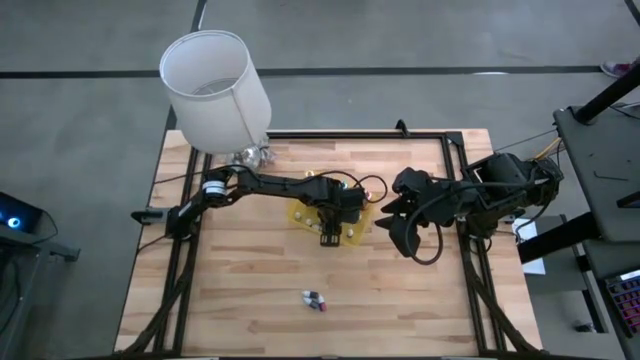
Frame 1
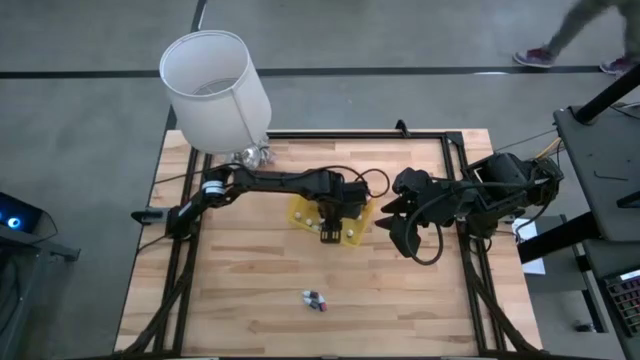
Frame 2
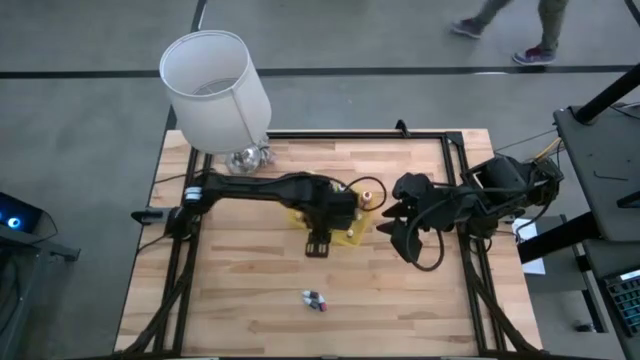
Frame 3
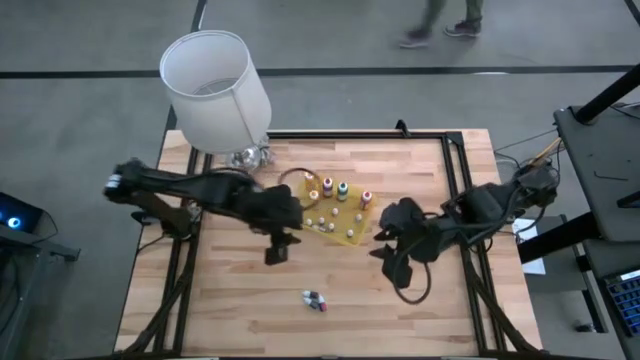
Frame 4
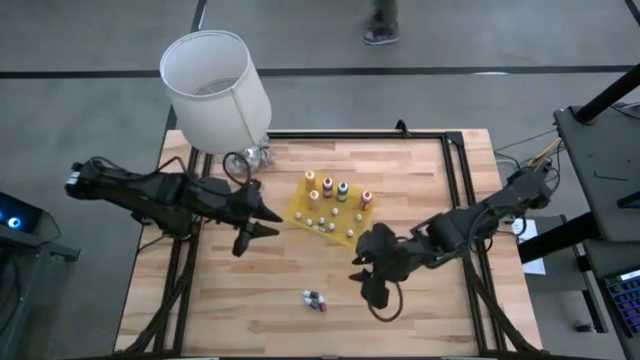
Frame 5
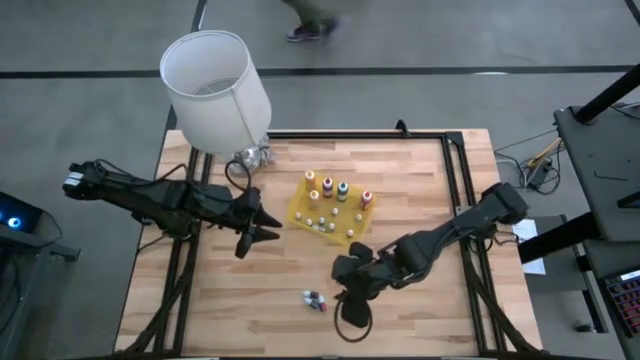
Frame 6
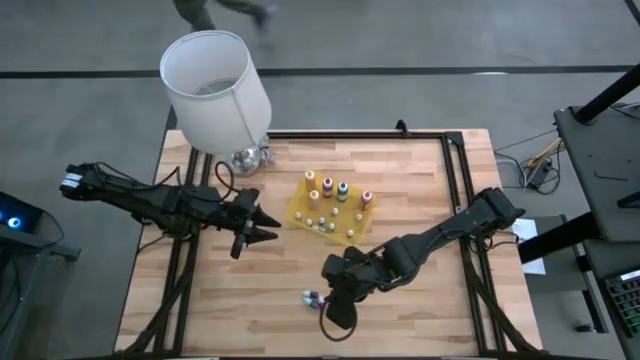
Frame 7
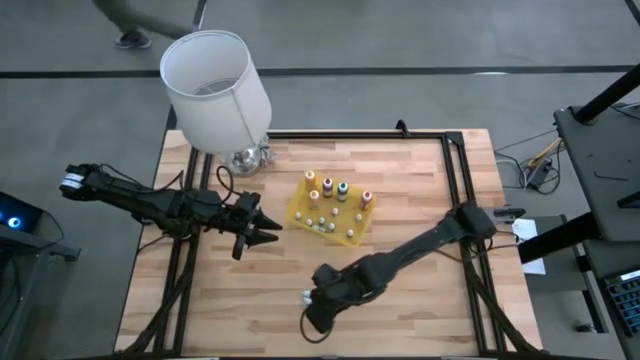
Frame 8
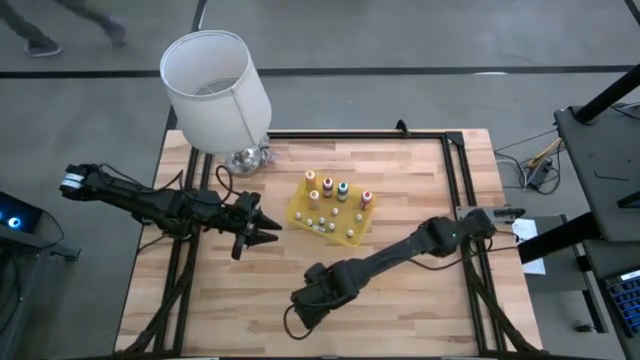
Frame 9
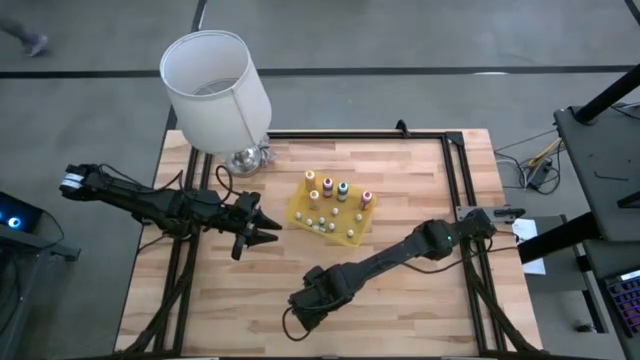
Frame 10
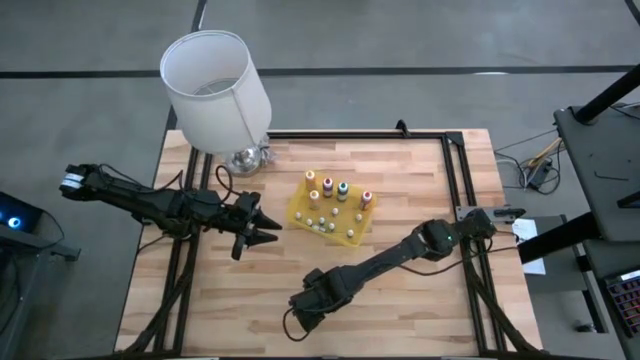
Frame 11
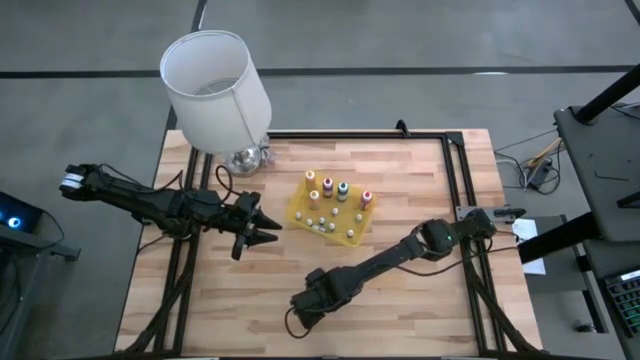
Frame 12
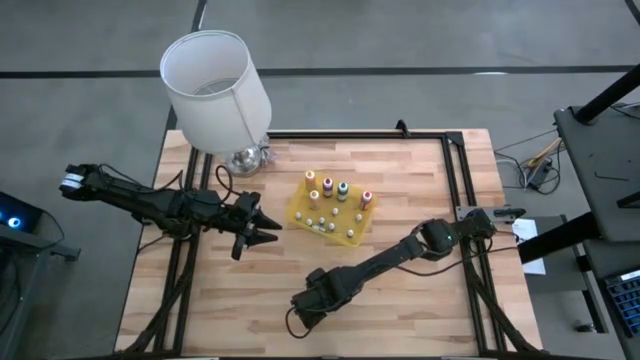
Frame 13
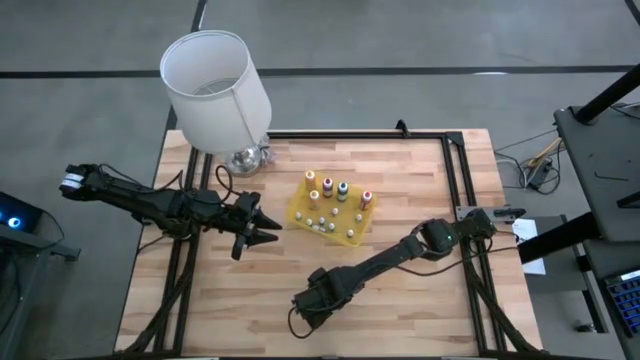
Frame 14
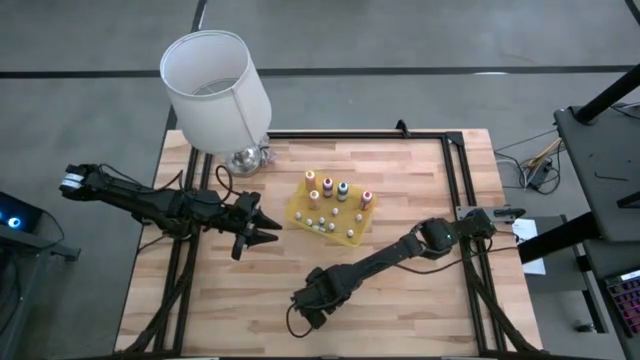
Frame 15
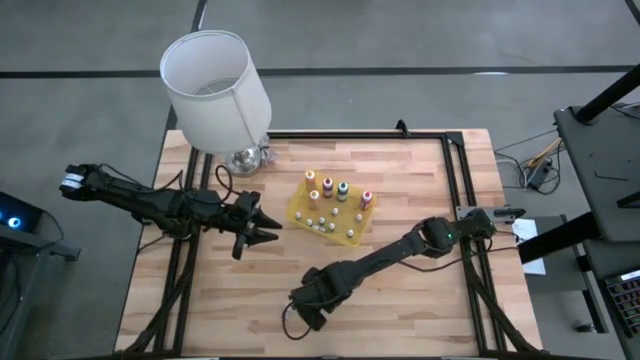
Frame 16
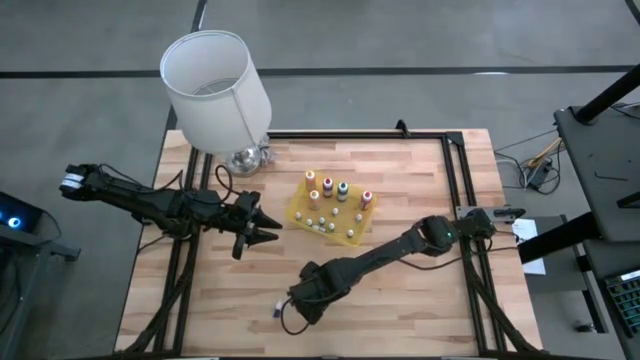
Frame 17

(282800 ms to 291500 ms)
Task: Pick & Place food coloring
Put the small red food coloring bottle into the yellow bin

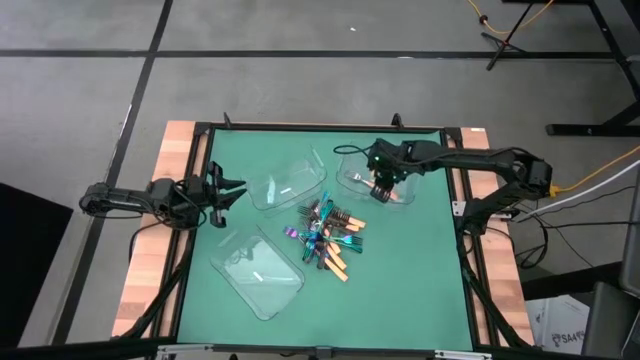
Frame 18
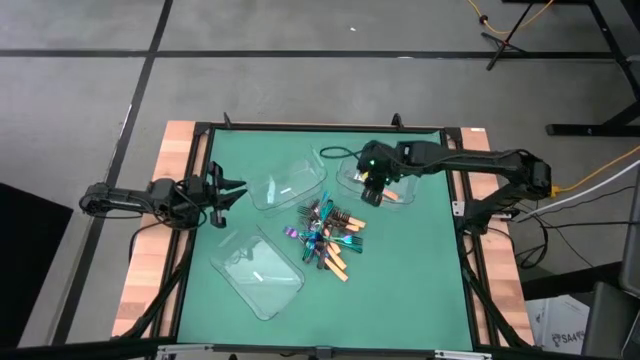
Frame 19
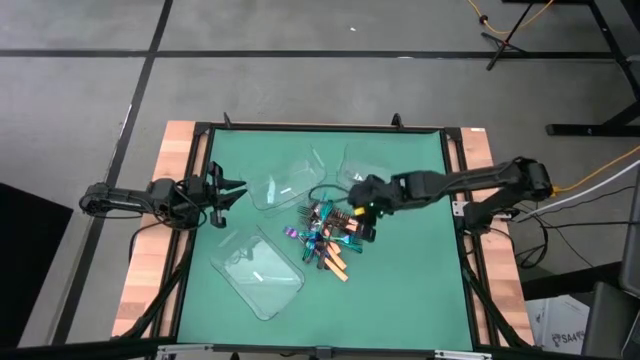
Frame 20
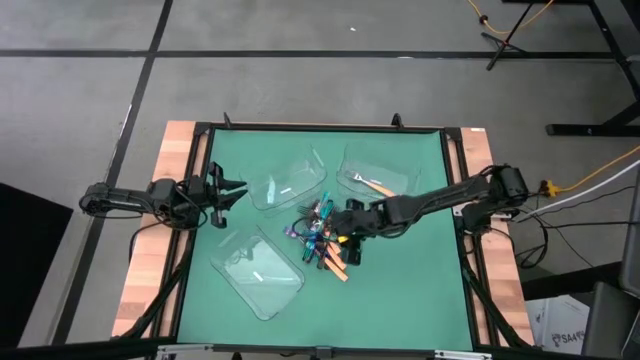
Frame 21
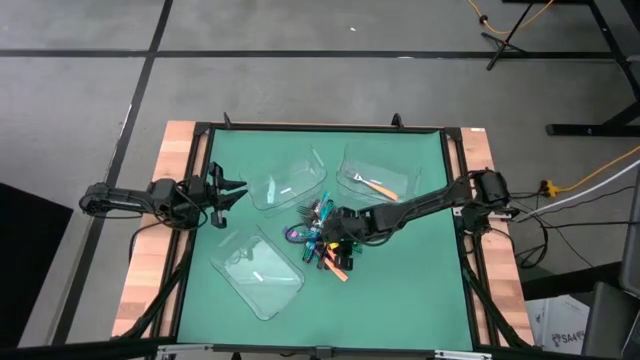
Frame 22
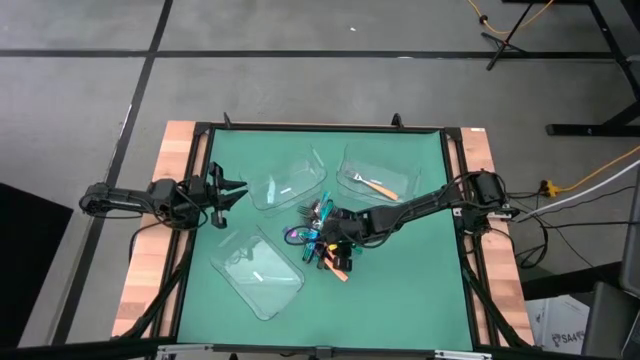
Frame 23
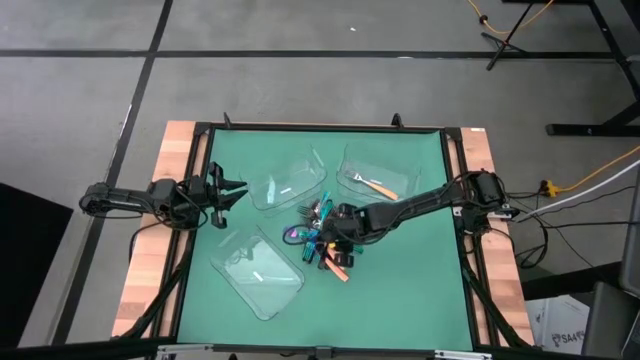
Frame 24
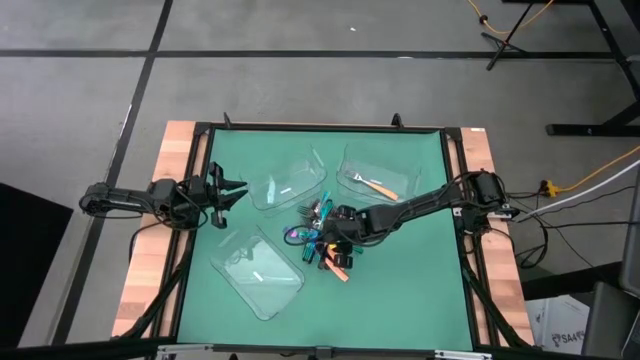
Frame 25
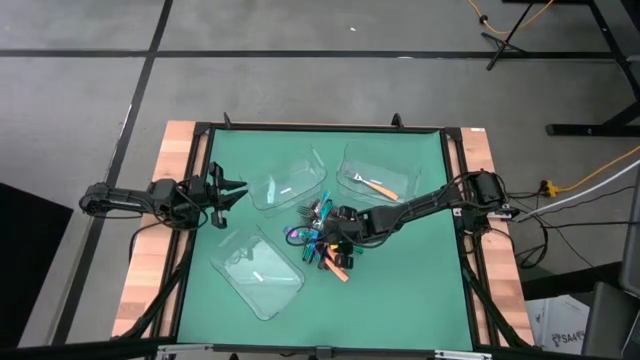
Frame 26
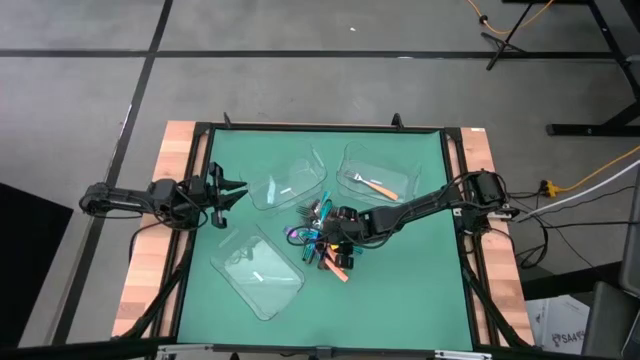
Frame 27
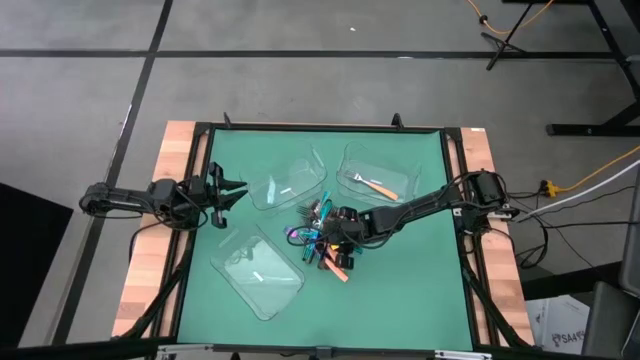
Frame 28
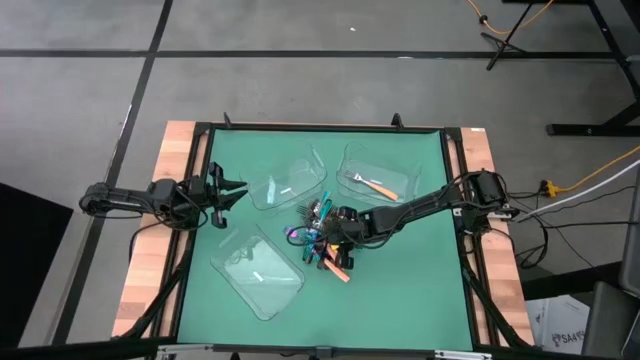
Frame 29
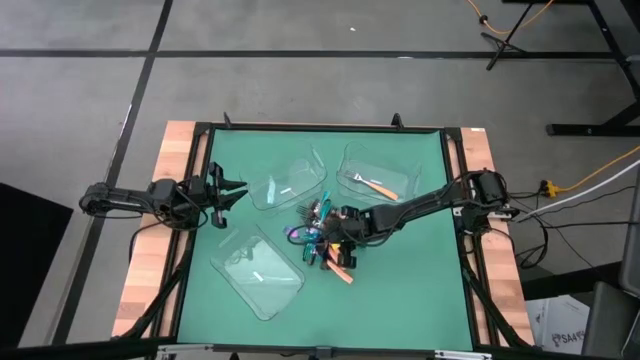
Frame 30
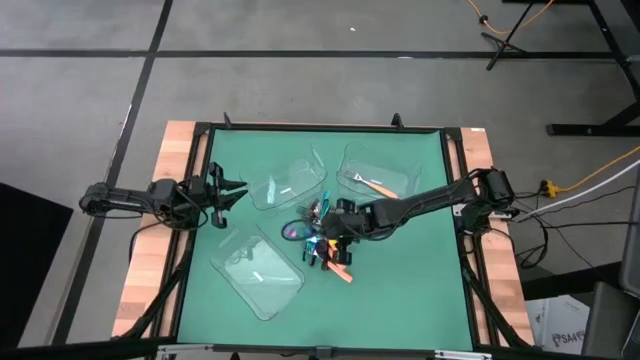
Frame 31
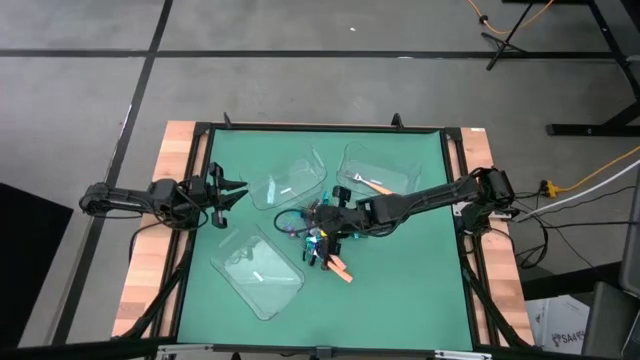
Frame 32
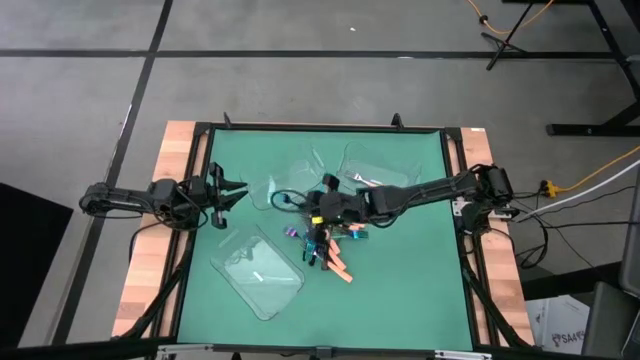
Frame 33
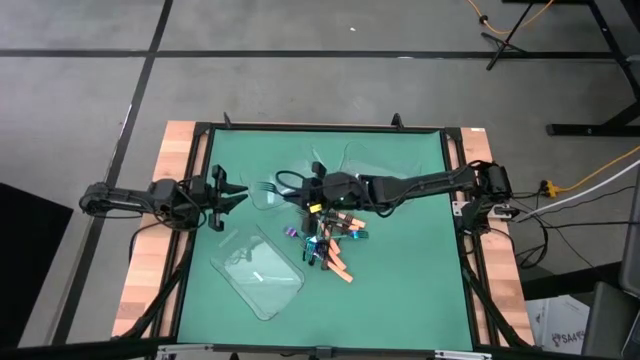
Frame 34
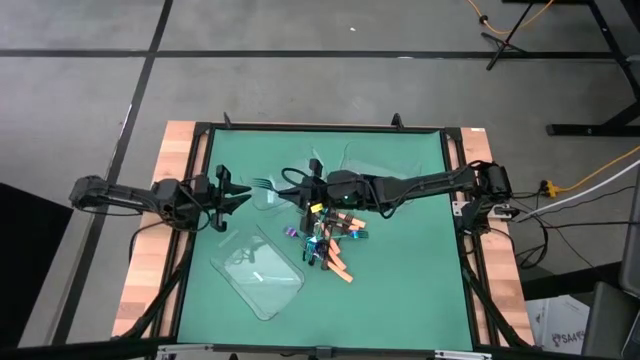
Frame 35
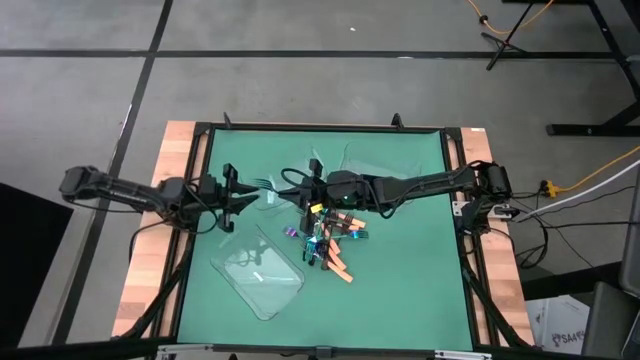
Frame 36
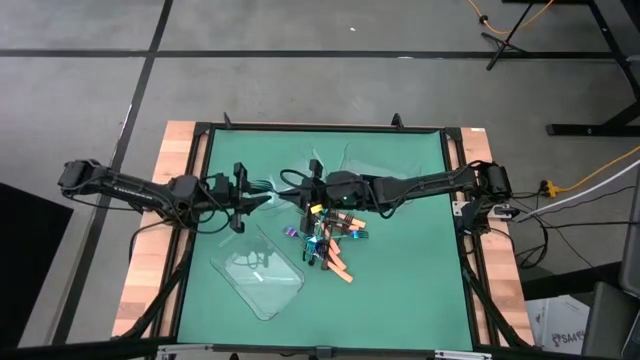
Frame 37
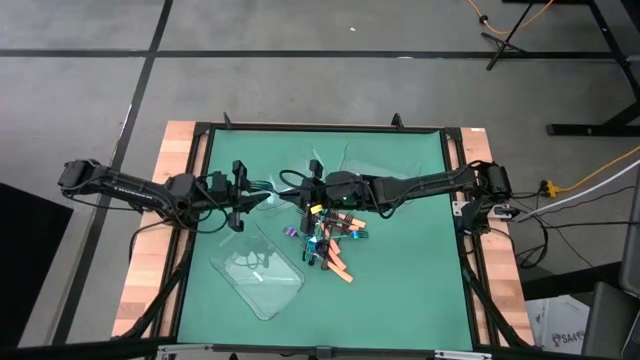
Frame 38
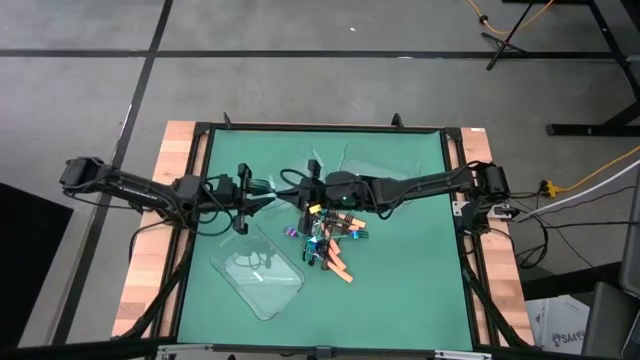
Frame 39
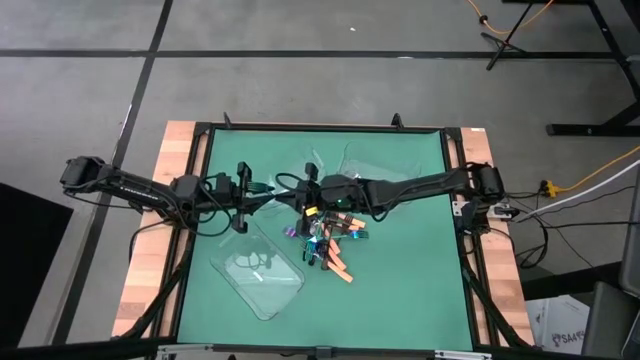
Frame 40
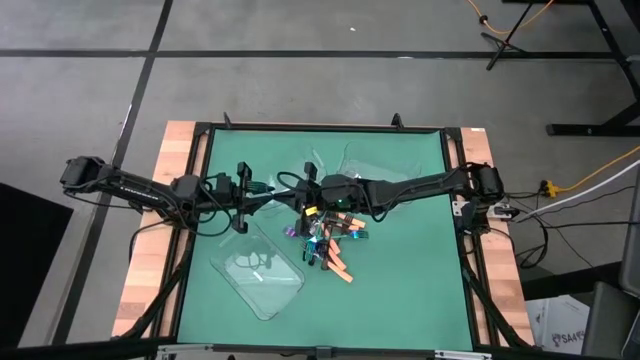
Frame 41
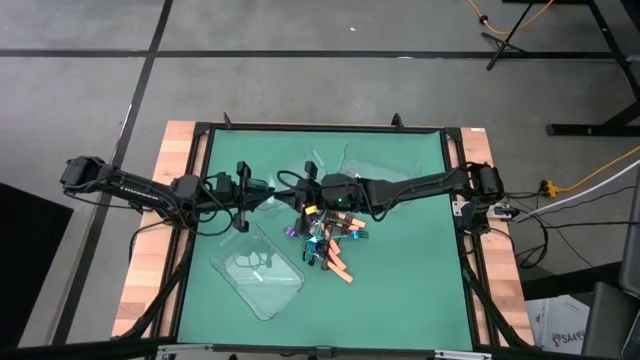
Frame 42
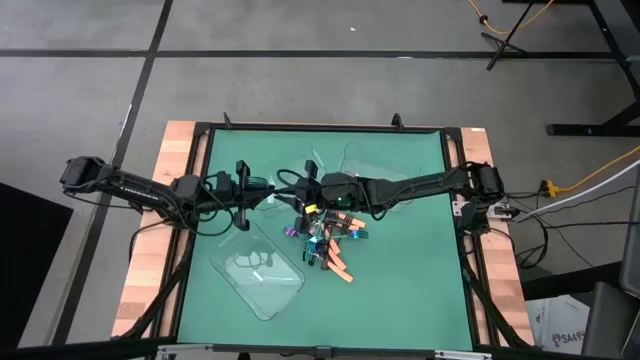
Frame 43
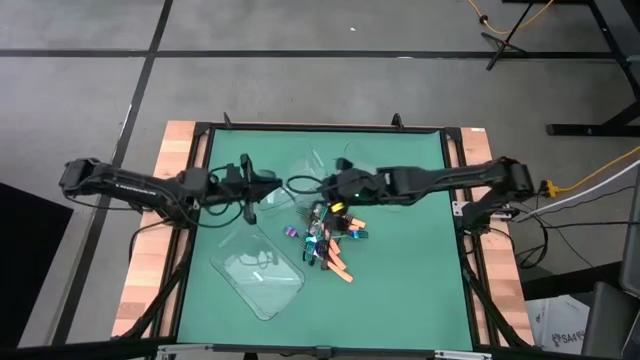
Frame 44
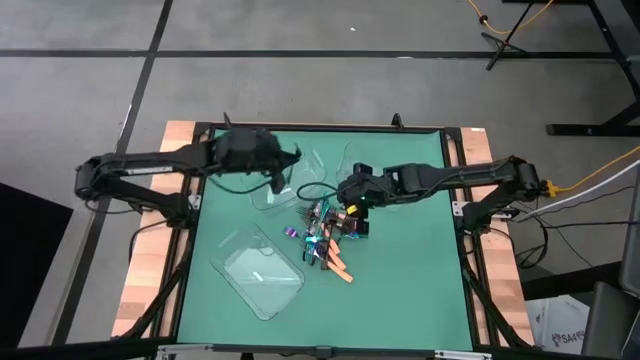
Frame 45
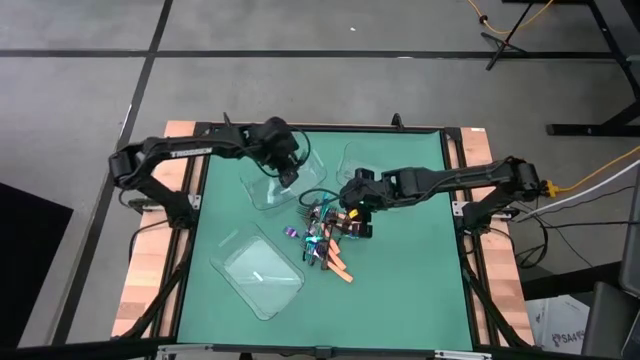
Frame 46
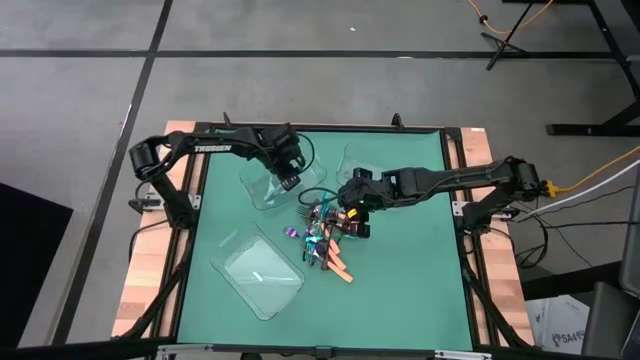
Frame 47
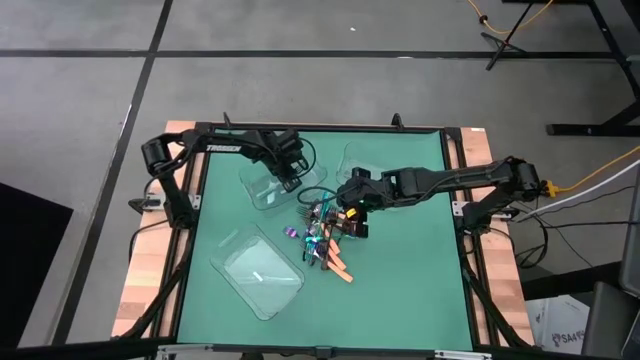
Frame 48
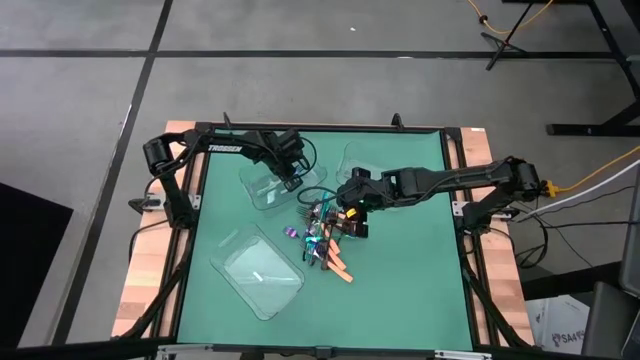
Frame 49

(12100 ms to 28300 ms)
Task: Sort silverware by color (type)
Put the blue fork into the top left transparent bin
